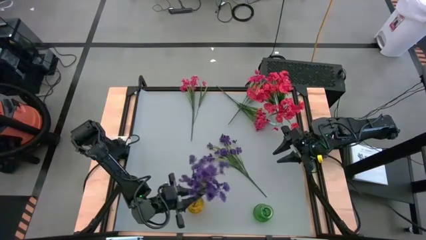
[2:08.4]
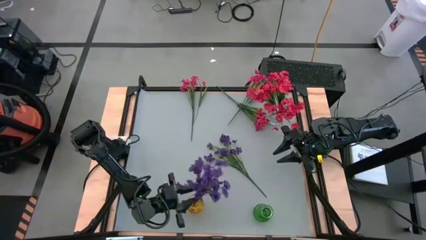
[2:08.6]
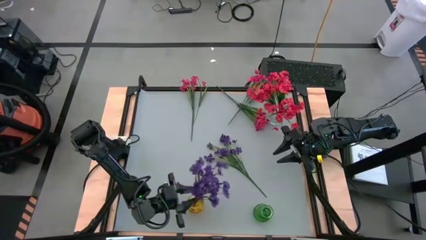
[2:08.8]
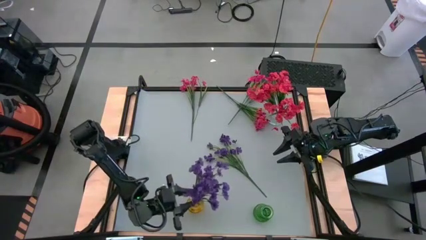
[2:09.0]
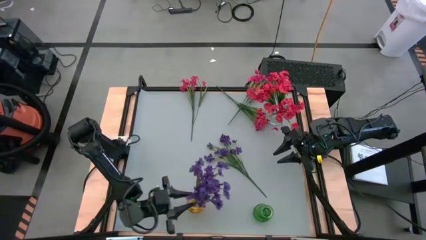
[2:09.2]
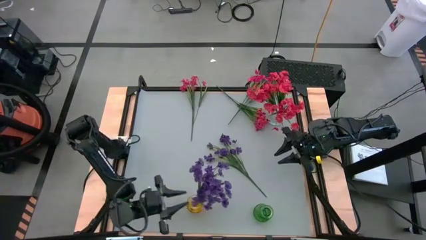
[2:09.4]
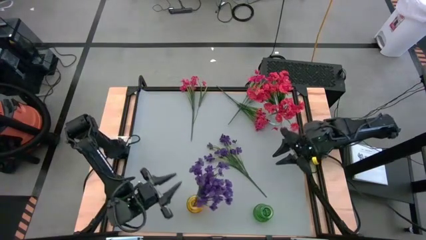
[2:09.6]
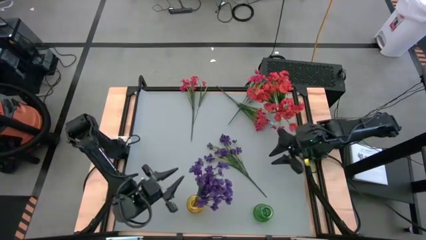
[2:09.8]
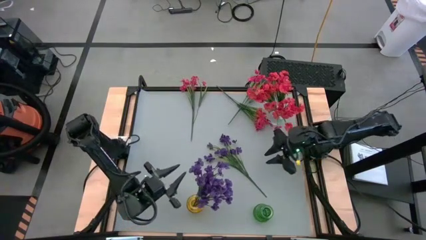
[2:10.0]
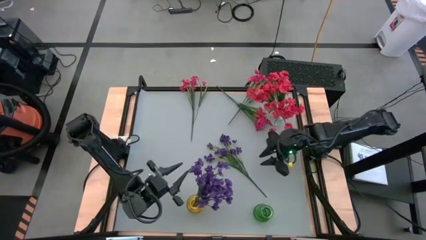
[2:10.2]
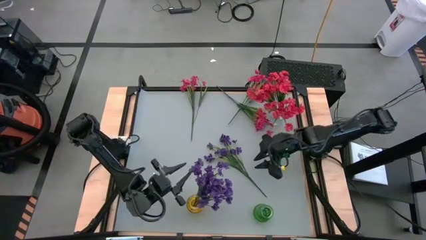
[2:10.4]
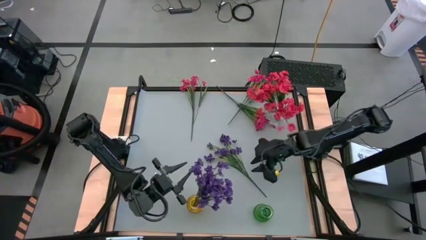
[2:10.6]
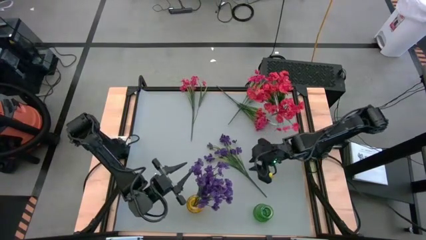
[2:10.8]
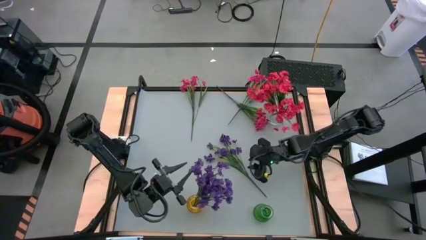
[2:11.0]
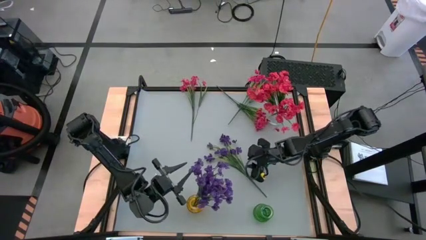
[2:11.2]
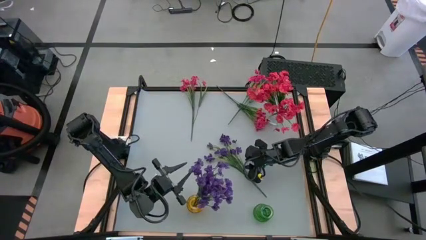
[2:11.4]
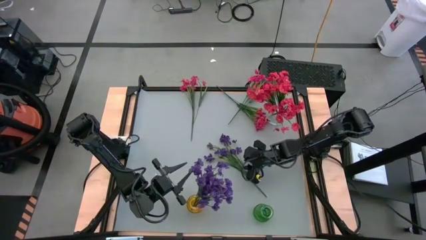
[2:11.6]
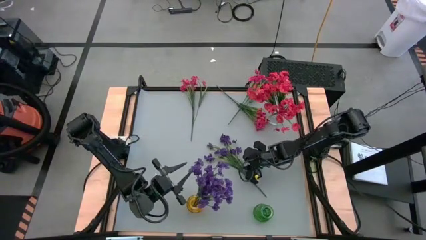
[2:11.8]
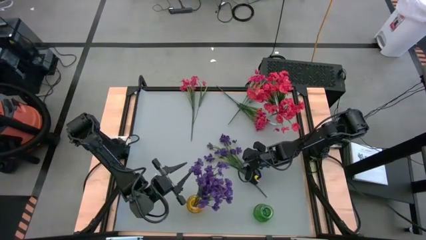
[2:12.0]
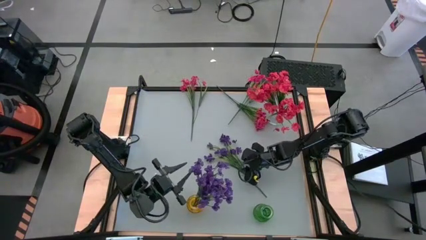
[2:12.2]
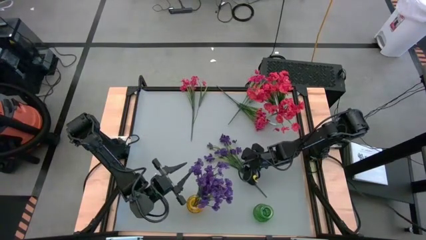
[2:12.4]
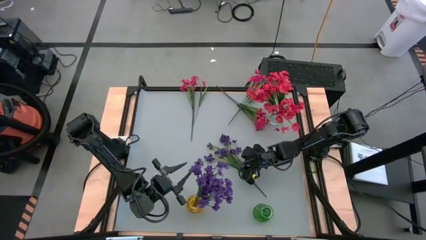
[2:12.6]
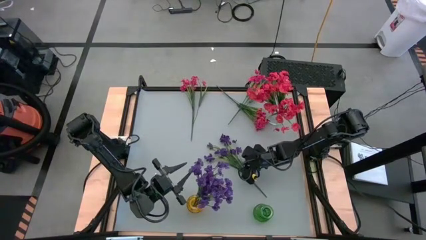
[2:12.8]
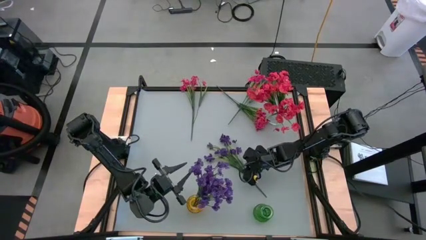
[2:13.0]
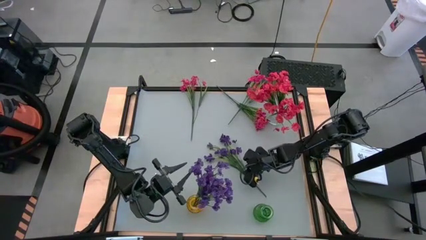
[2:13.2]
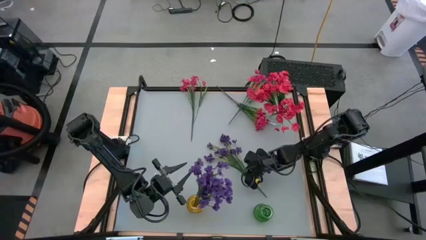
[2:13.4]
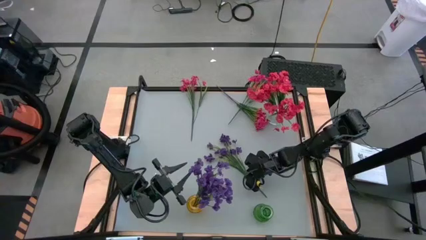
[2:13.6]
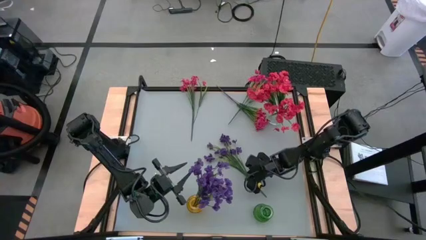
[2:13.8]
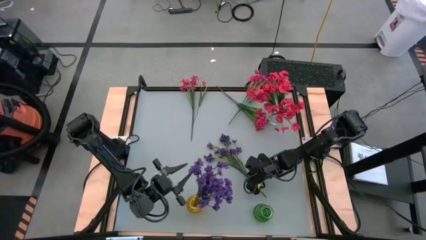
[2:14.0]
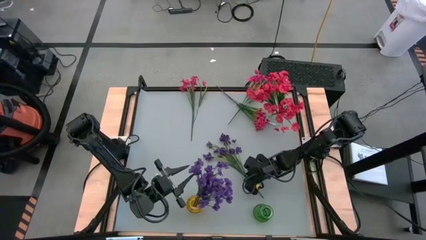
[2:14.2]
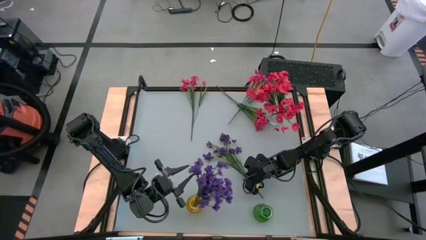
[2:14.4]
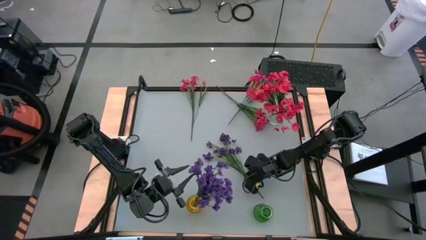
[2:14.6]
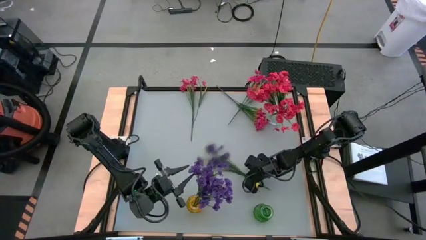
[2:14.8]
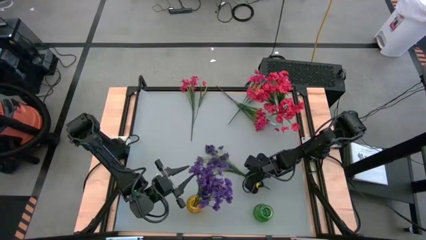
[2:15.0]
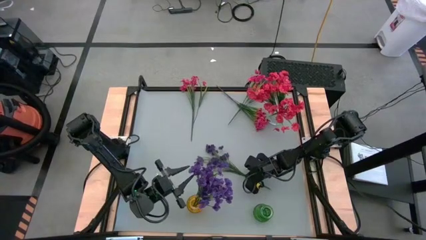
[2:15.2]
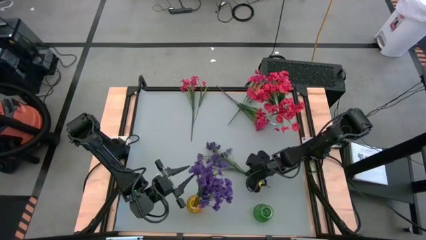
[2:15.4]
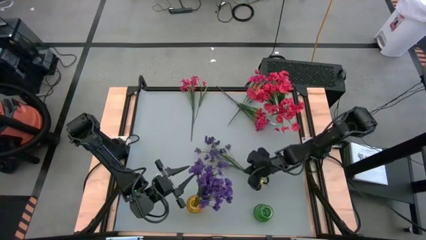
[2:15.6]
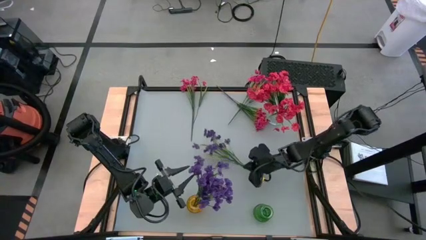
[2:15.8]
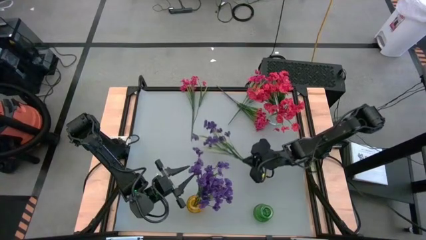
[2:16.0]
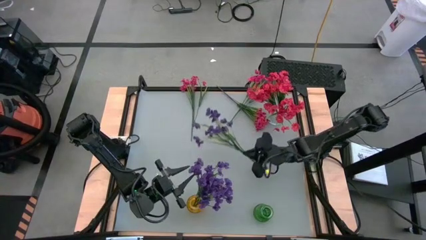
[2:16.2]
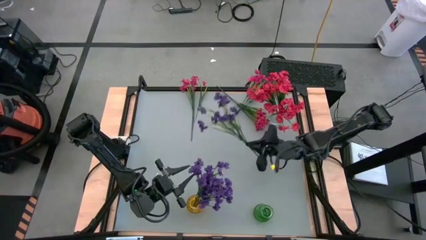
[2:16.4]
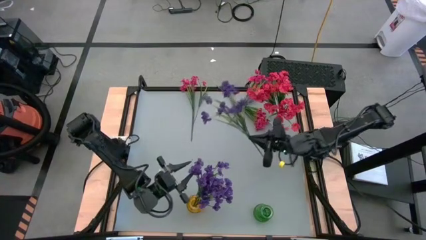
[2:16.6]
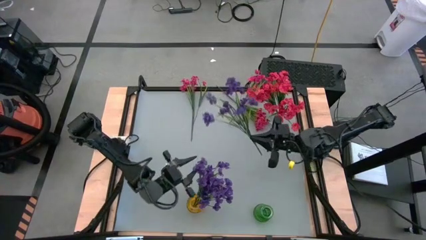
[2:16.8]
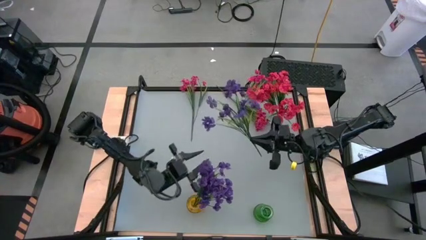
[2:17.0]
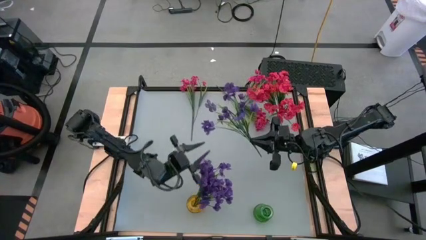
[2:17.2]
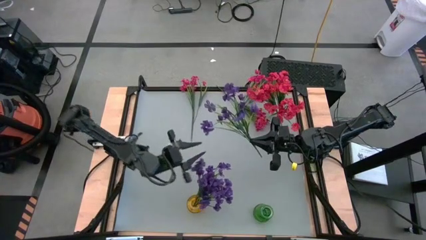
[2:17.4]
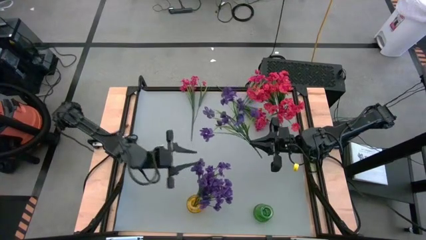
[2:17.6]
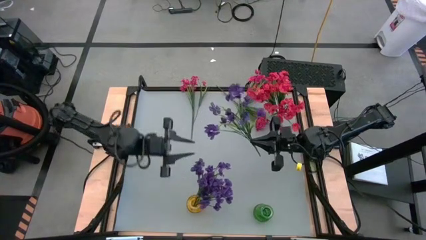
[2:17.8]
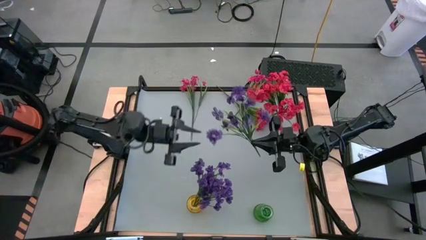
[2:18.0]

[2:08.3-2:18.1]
Task: Sort flowers into vase by color
Put the purple flower into the yellow transparent vase

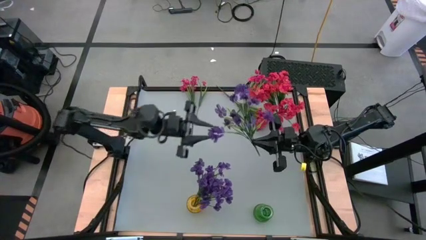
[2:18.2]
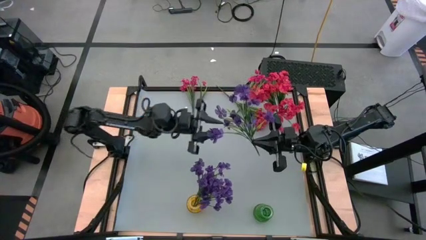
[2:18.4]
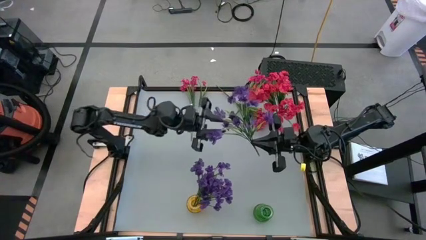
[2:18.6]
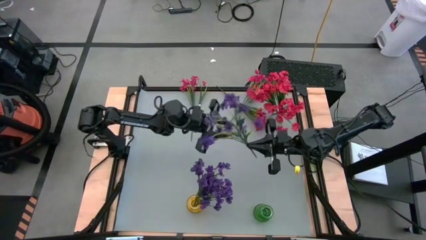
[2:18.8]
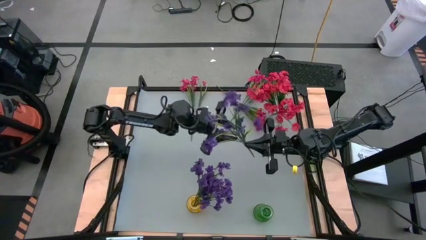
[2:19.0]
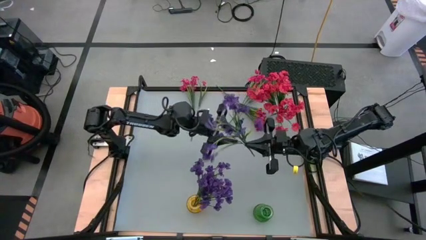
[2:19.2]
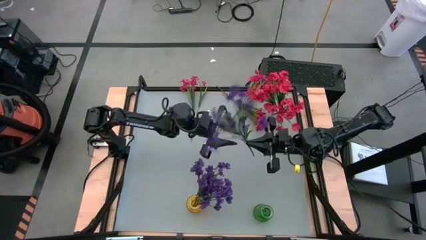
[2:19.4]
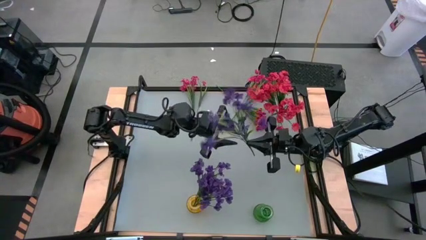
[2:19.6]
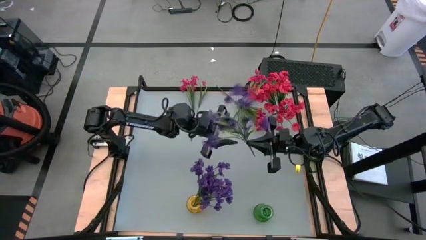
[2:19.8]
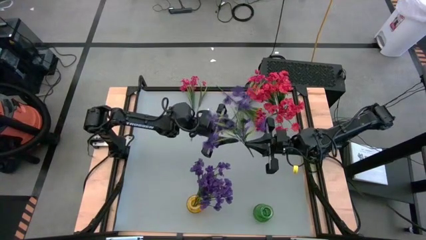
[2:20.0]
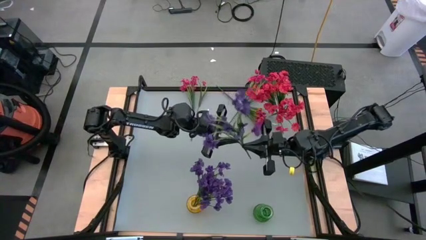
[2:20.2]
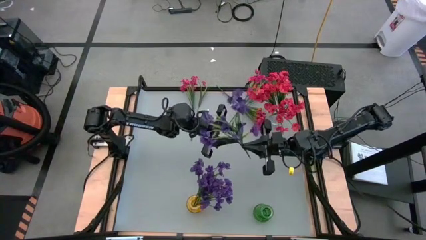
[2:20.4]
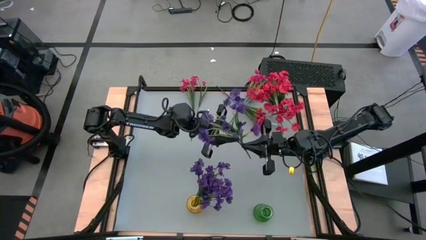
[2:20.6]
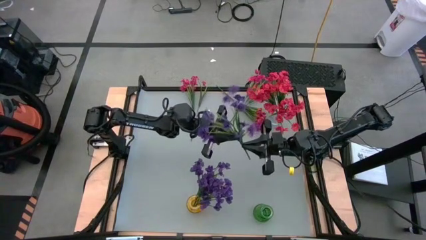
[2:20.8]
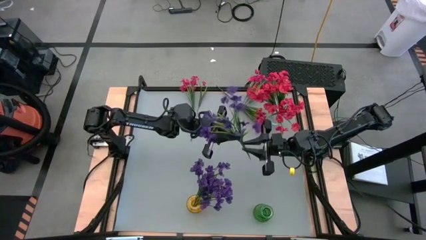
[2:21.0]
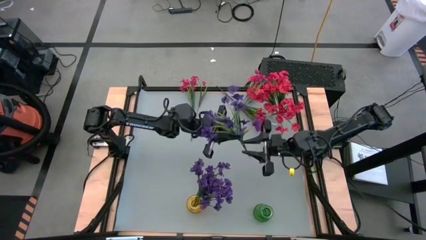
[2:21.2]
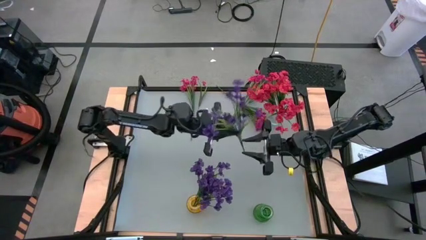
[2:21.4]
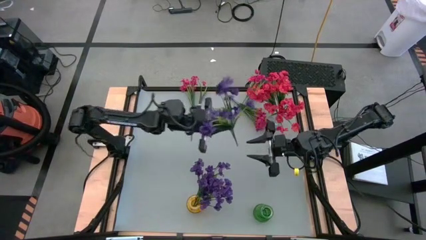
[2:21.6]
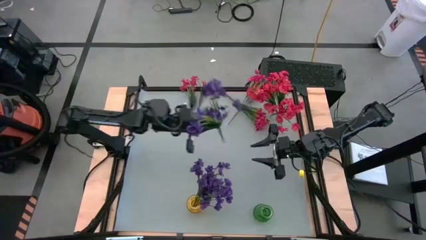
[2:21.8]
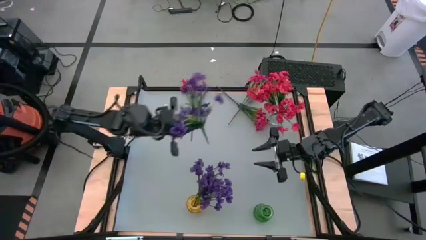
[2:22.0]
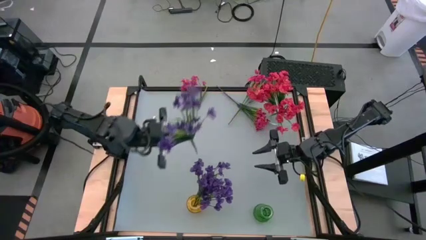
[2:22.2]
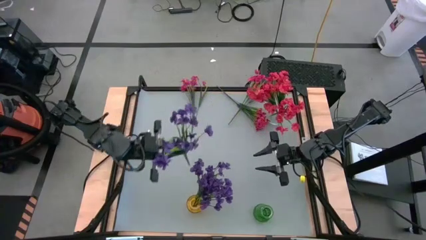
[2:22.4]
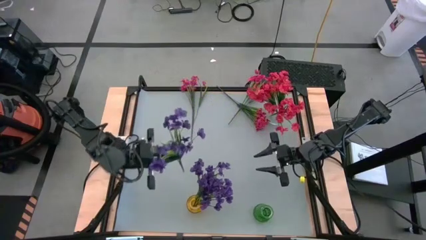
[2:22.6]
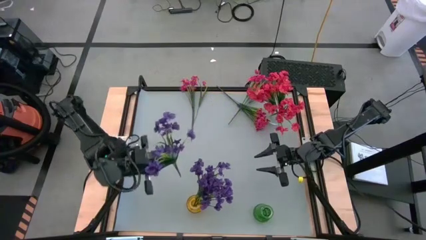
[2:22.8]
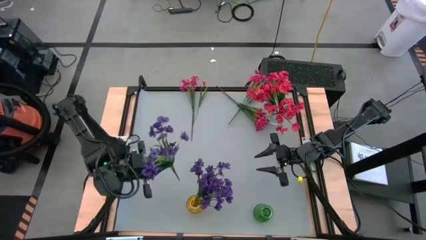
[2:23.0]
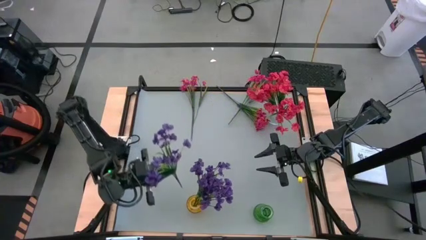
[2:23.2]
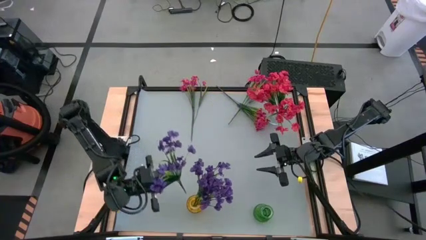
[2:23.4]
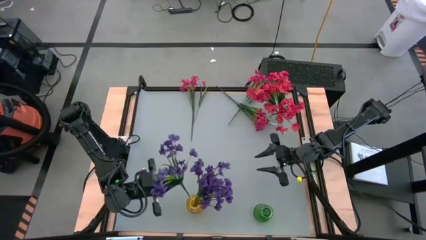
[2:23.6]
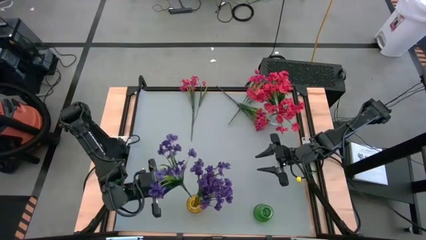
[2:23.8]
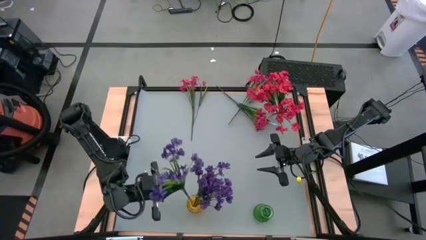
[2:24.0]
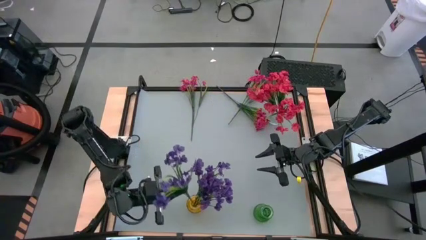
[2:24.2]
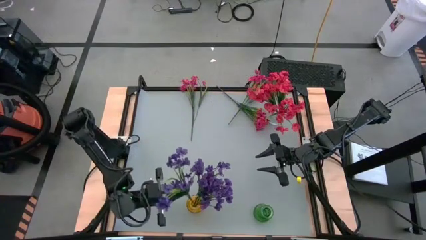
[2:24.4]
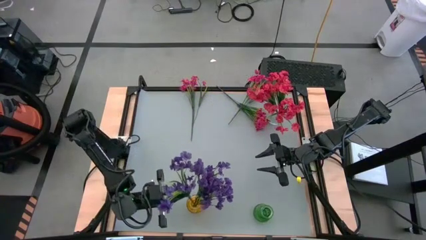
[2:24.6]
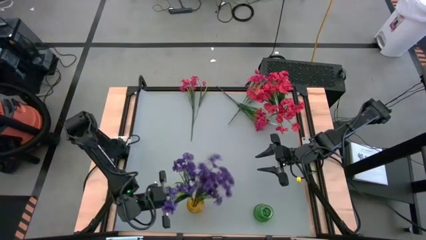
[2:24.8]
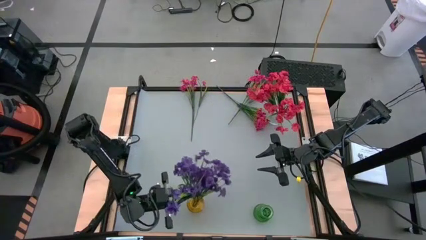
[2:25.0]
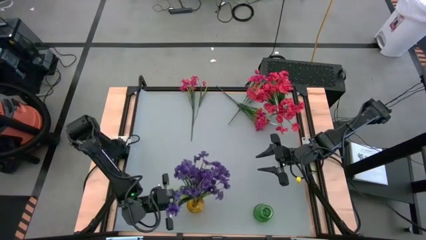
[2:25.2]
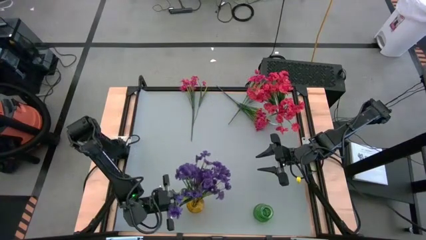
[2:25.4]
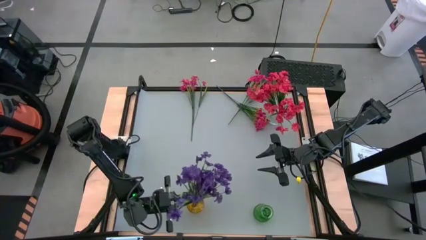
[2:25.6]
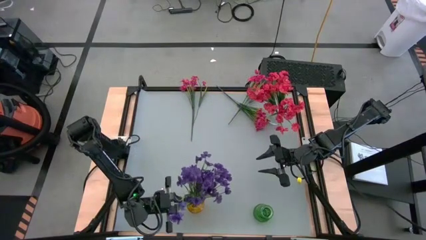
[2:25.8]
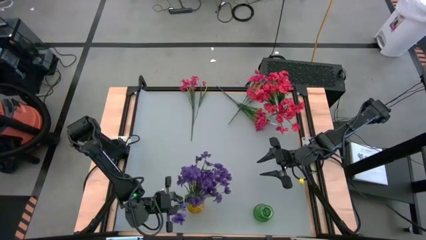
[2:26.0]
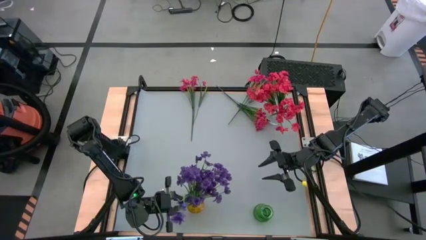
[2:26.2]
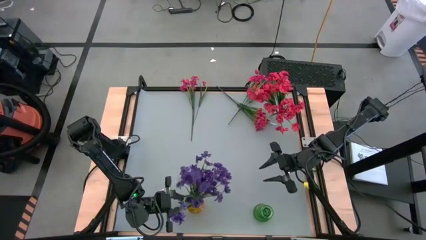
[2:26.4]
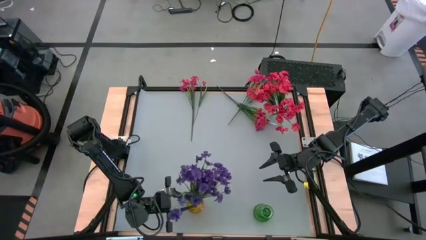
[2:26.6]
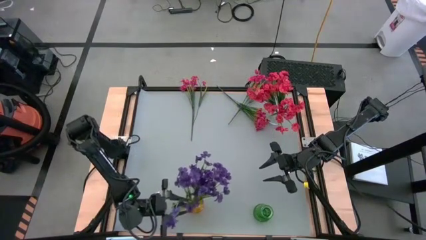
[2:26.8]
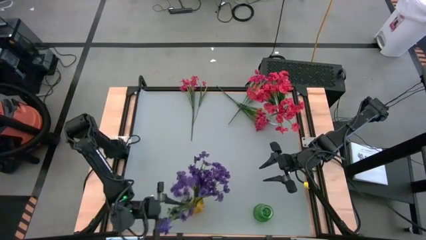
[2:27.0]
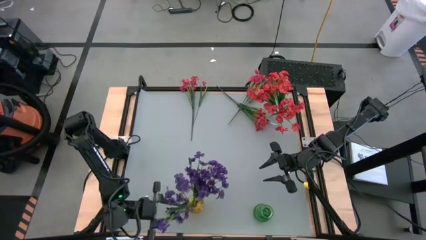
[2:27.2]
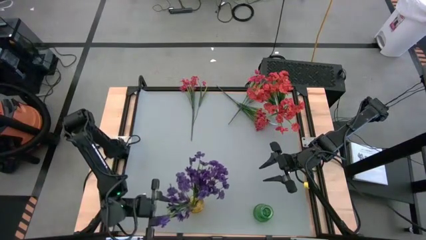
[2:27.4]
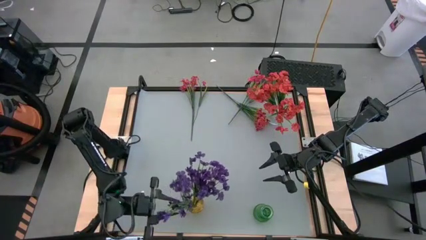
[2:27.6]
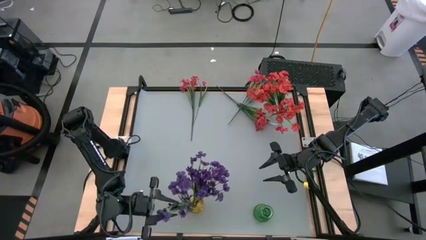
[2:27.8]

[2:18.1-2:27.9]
Put the purple flower into the yellow transparent vase
